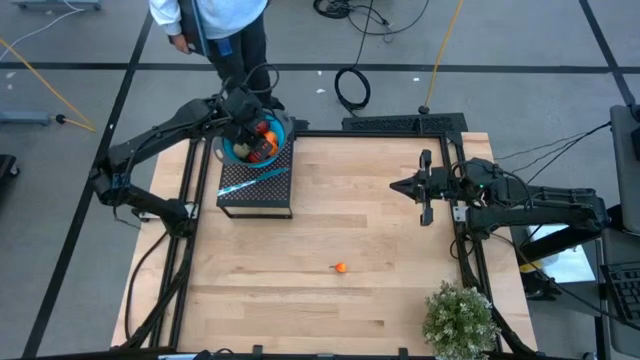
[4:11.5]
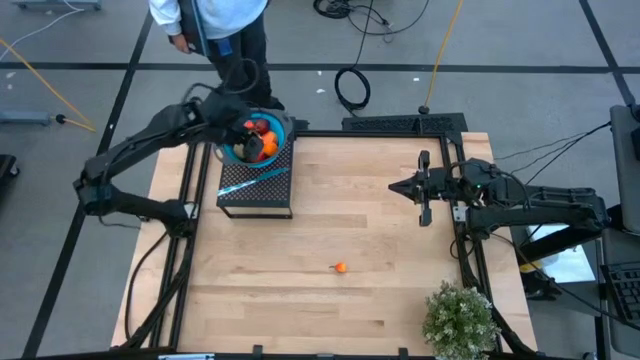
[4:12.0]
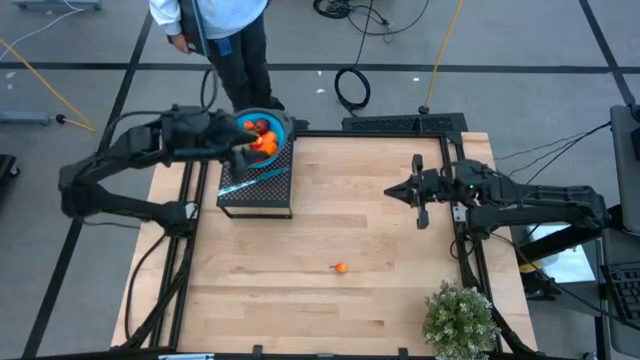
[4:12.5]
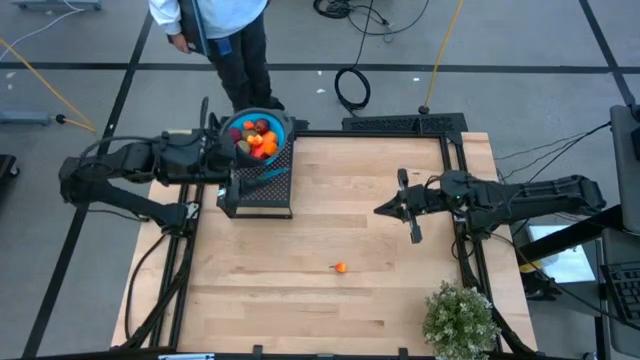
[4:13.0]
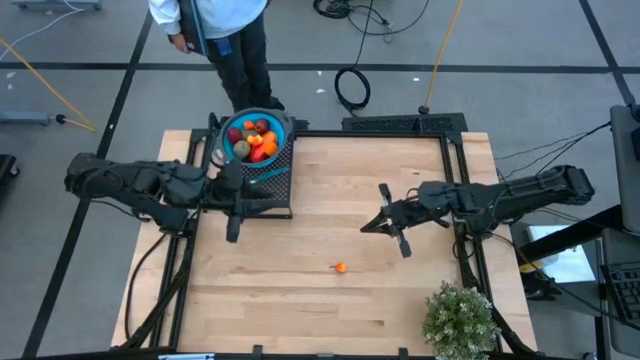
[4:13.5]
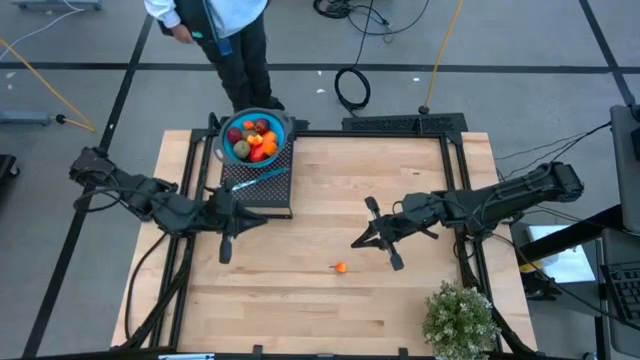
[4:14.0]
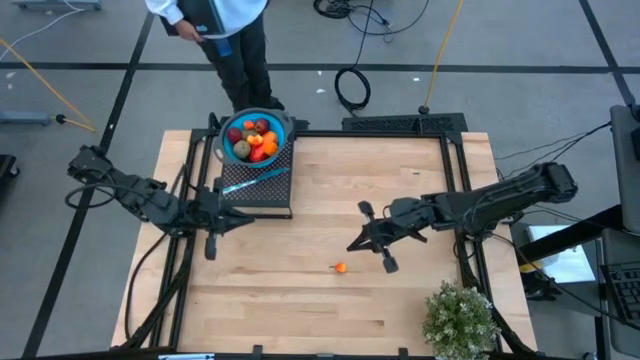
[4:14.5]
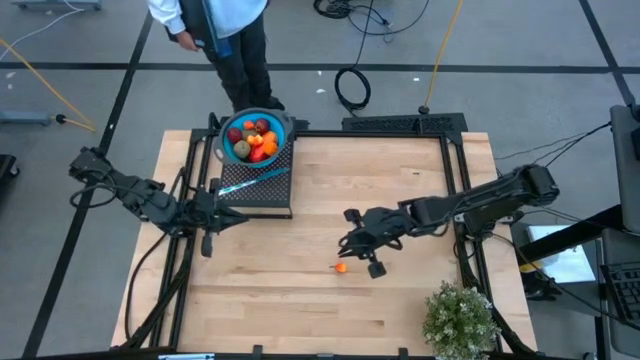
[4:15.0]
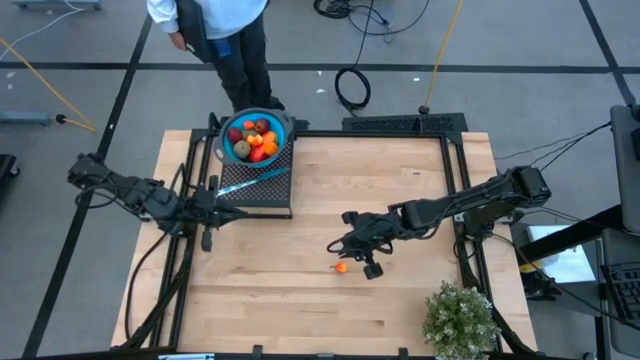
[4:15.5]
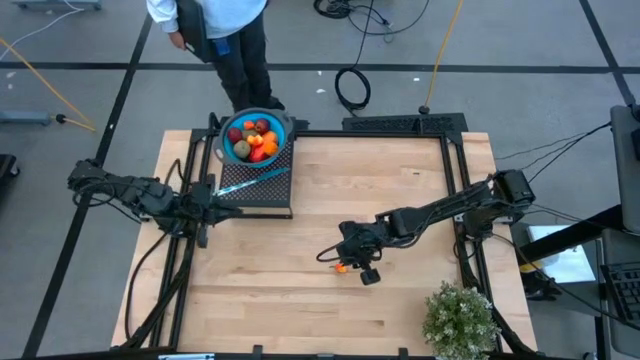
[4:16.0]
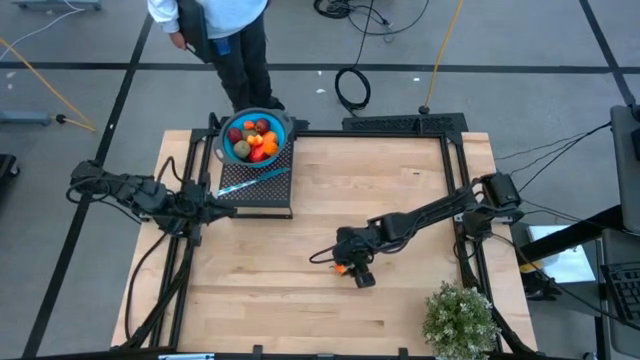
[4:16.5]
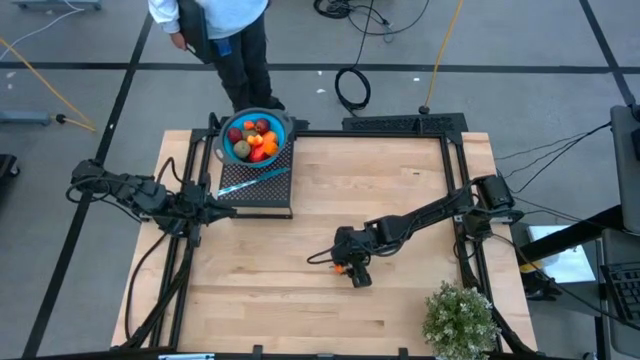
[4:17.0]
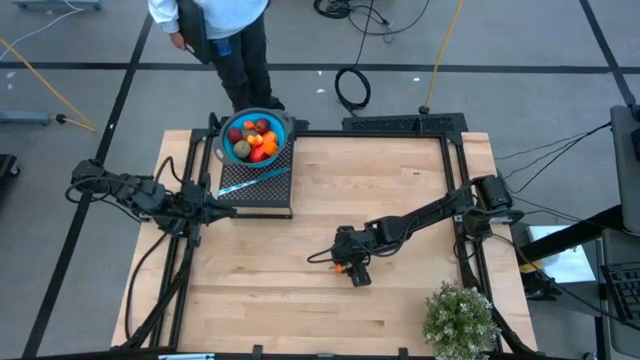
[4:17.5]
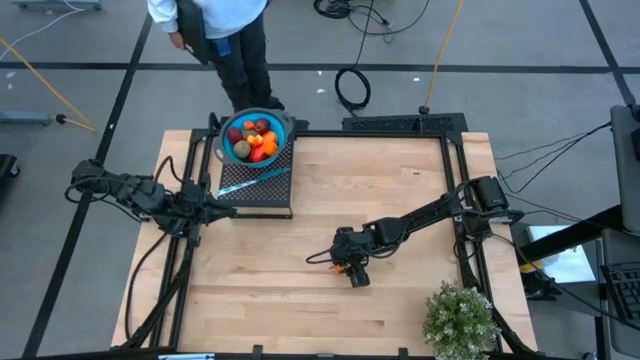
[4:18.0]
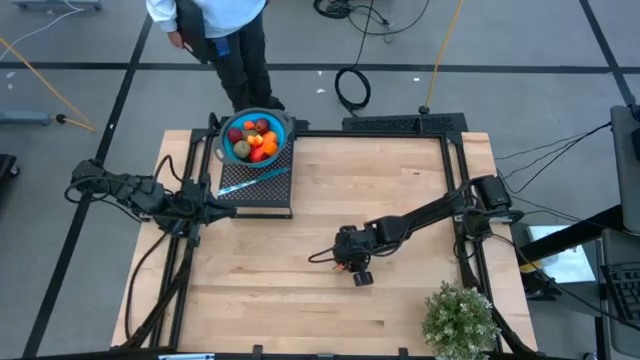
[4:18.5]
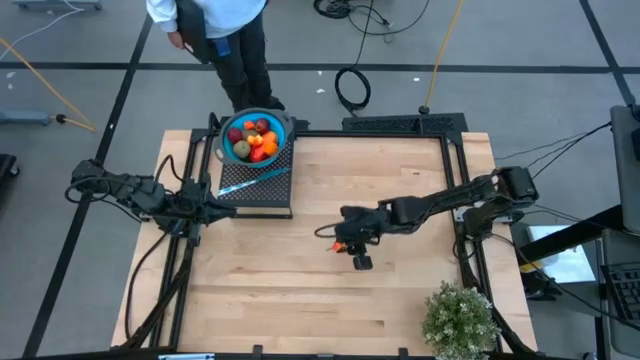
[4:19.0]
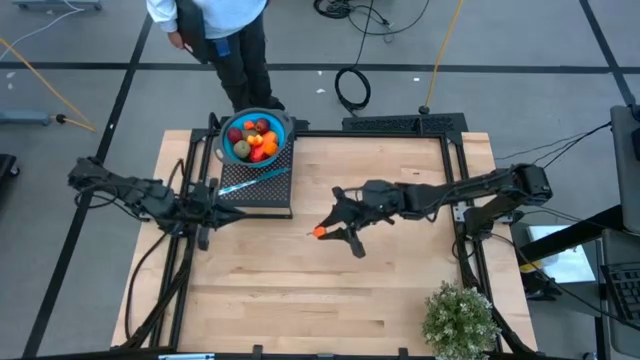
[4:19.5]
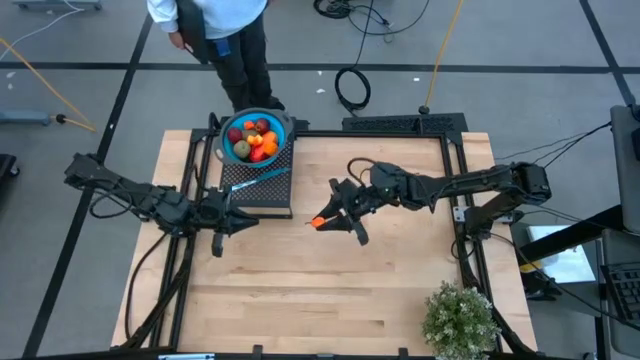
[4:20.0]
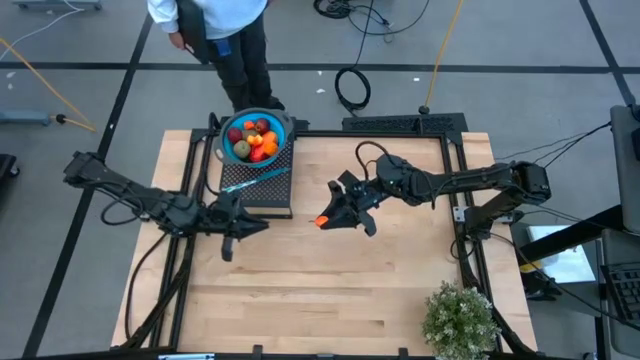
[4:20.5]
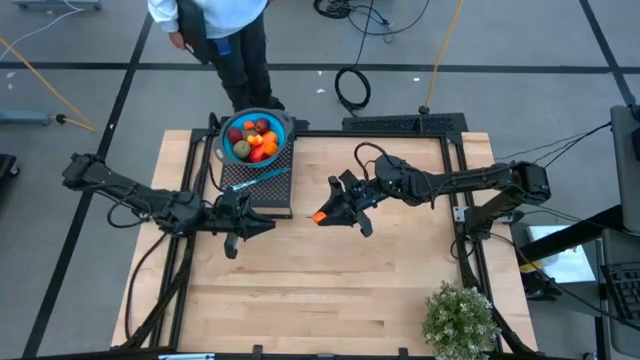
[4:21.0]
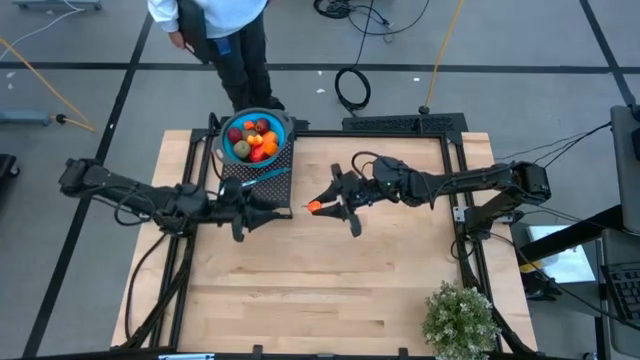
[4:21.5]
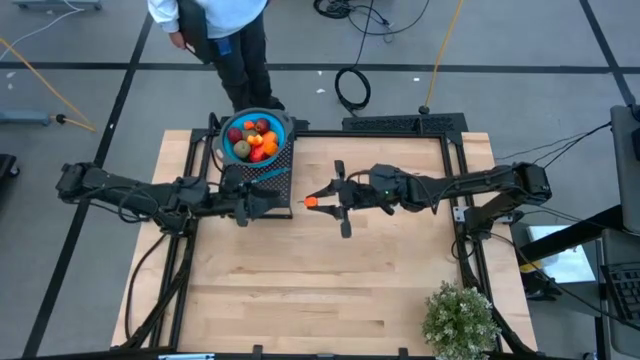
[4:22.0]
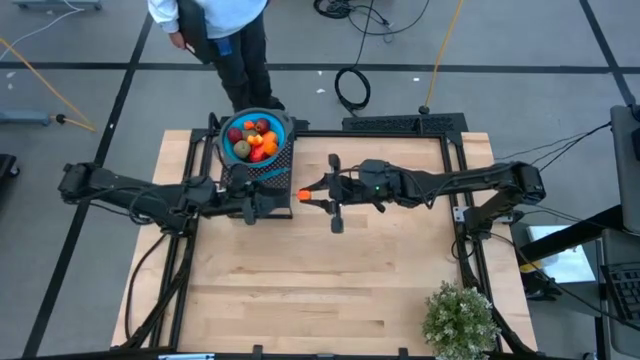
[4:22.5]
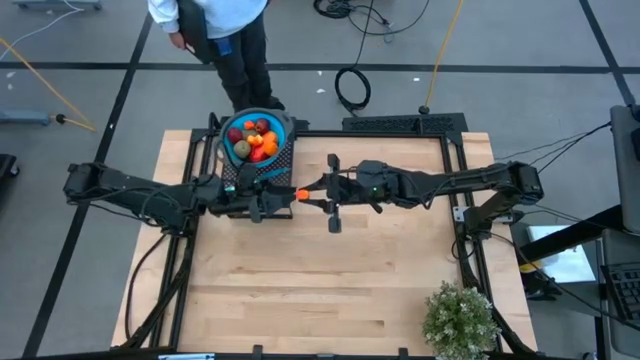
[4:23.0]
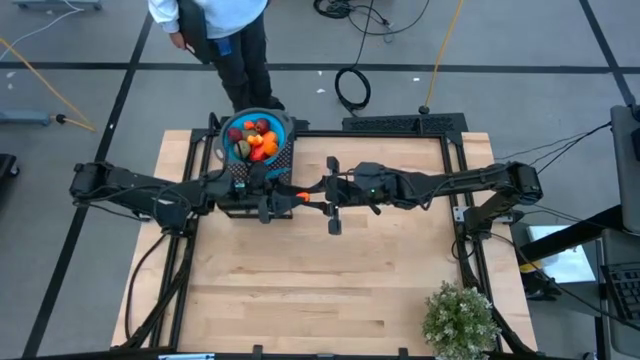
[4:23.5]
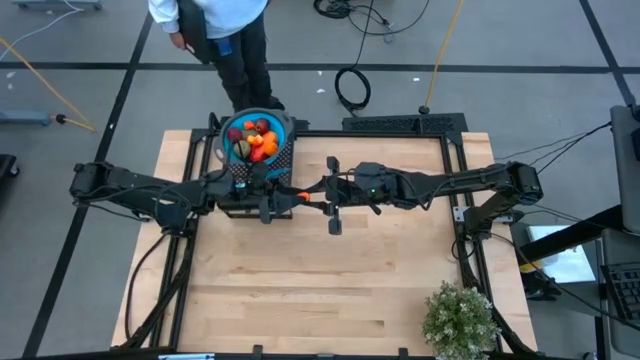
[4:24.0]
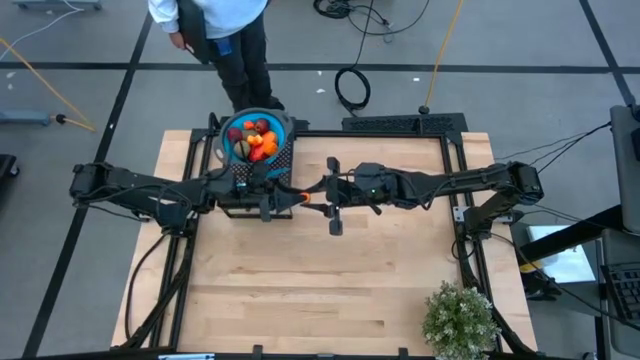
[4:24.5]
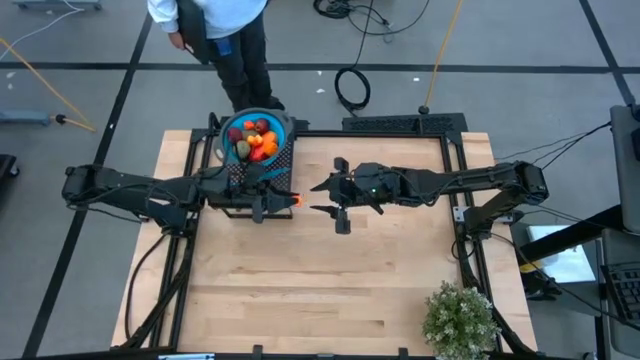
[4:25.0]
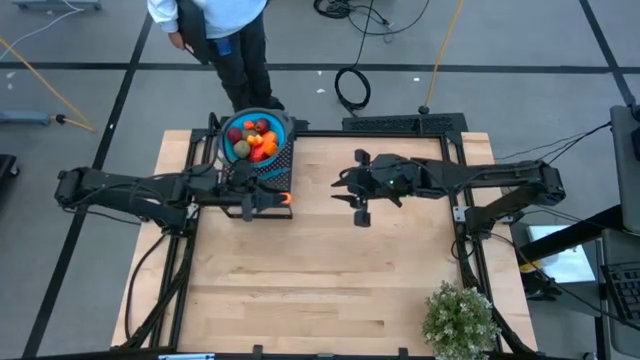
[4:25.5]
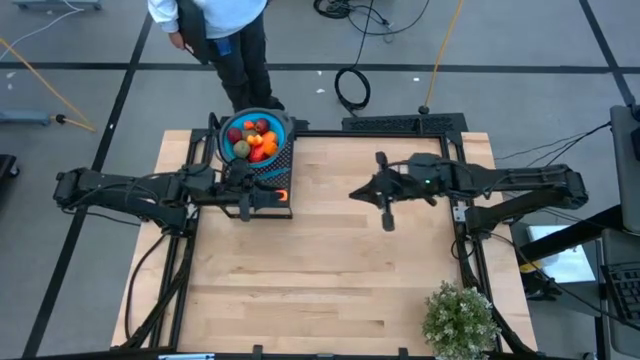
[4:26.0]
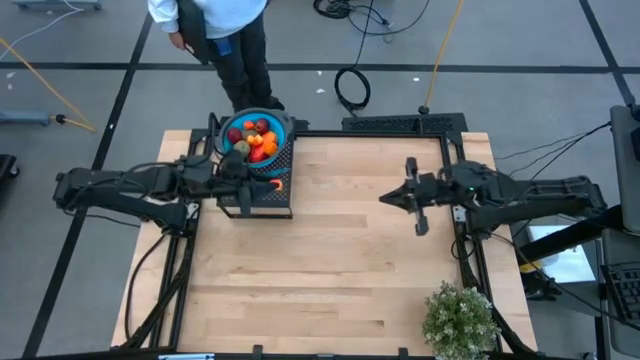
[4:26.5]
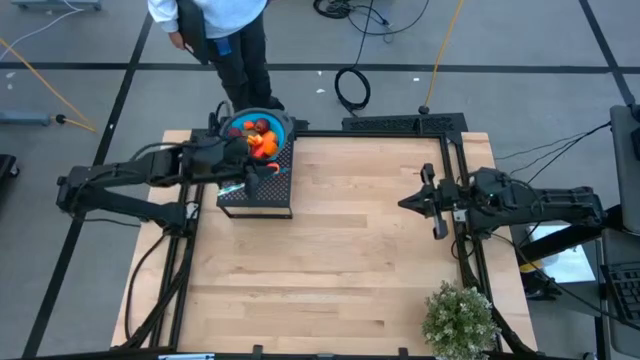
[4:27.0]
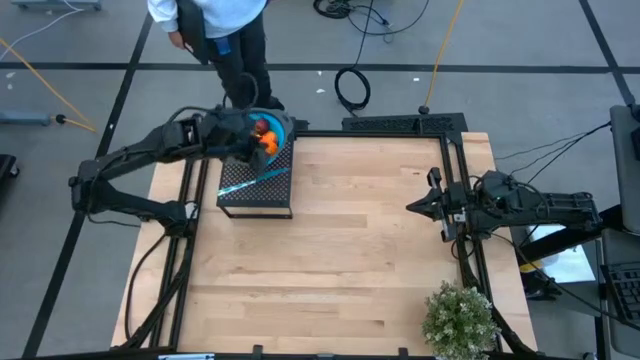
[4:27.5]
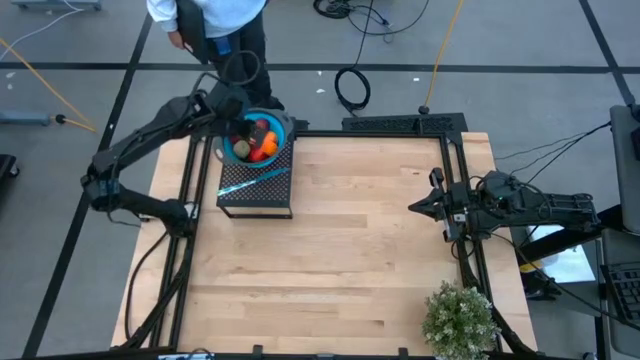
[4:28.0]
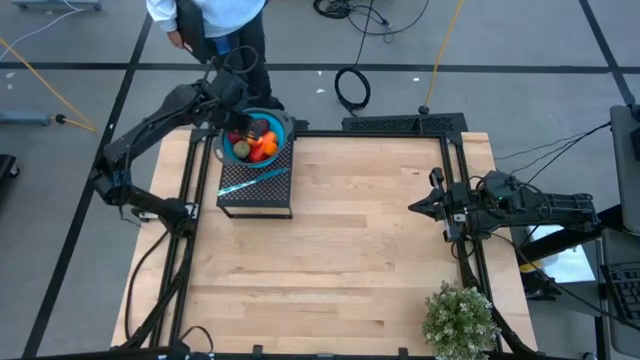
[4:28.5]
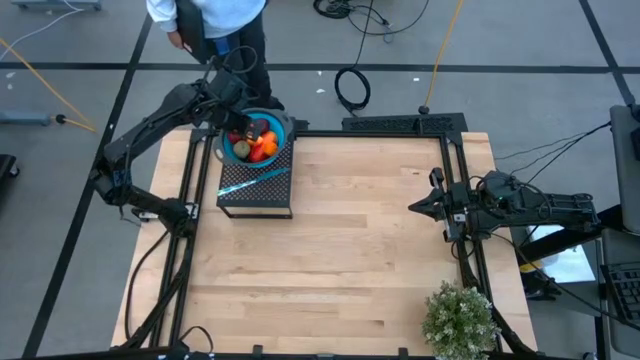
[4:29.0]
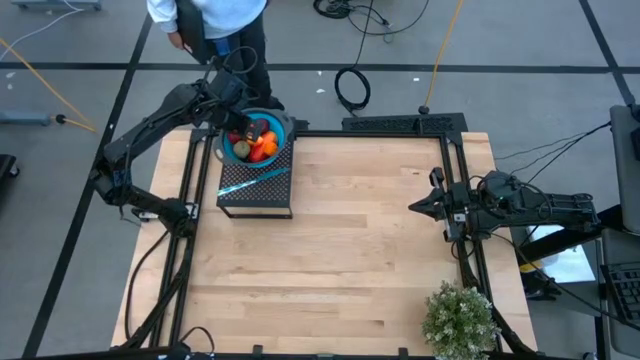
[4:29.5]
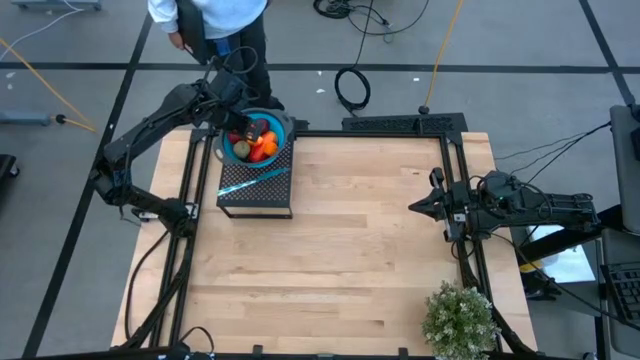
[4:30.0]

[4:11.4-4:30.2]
Task: Pick & Place Fruit
Put the yellow pear into the blue strainer bowl on the shelf

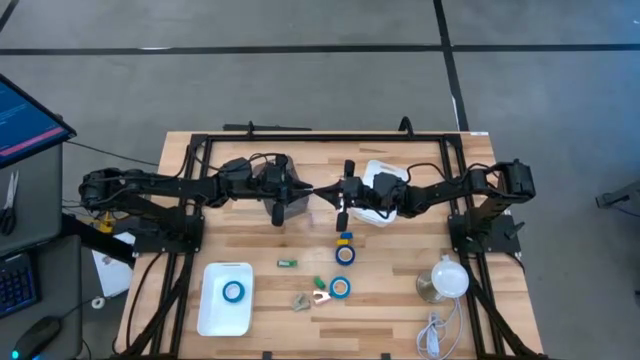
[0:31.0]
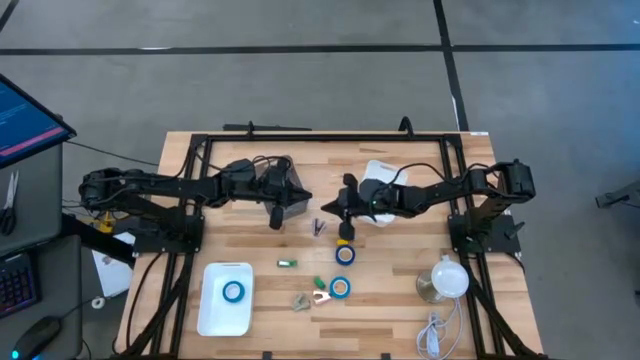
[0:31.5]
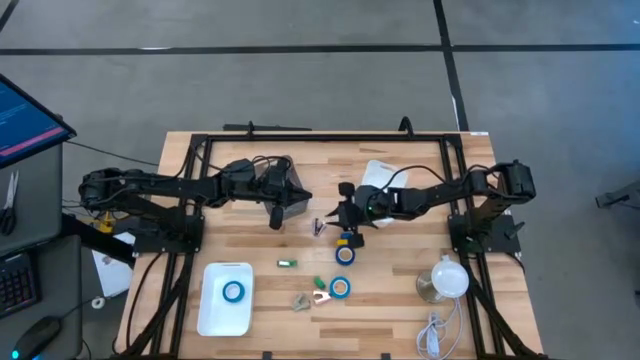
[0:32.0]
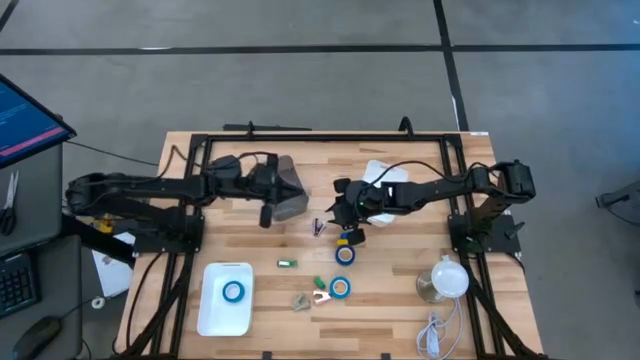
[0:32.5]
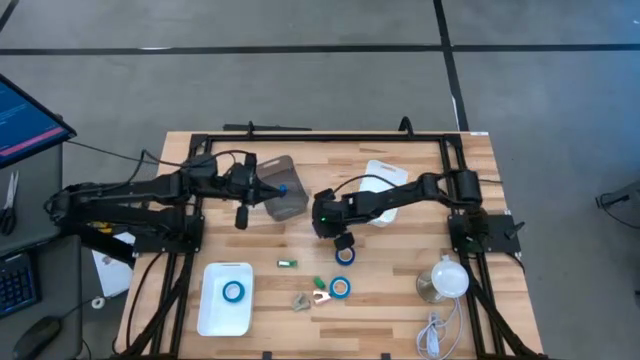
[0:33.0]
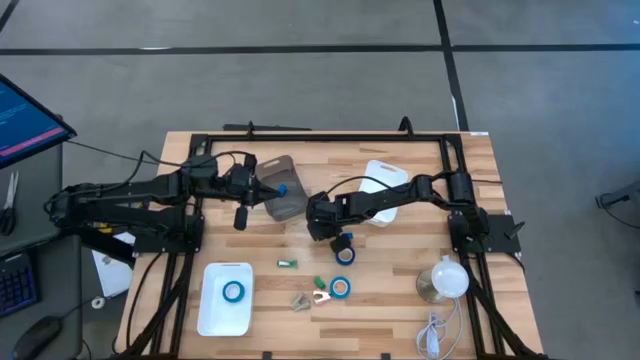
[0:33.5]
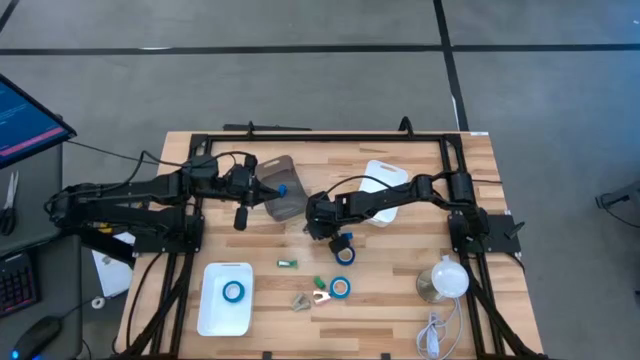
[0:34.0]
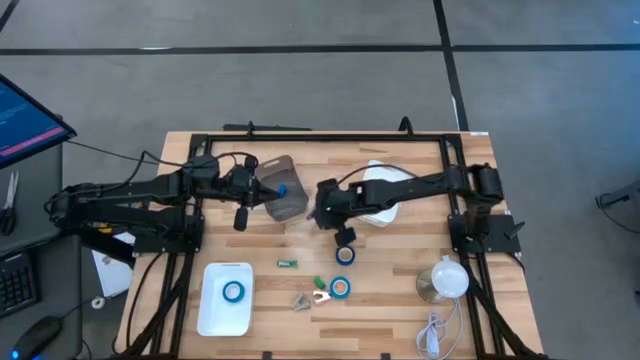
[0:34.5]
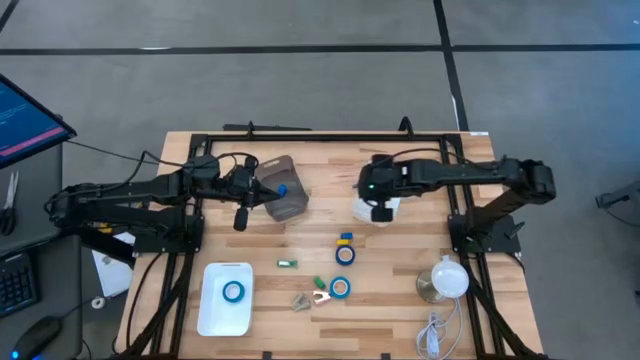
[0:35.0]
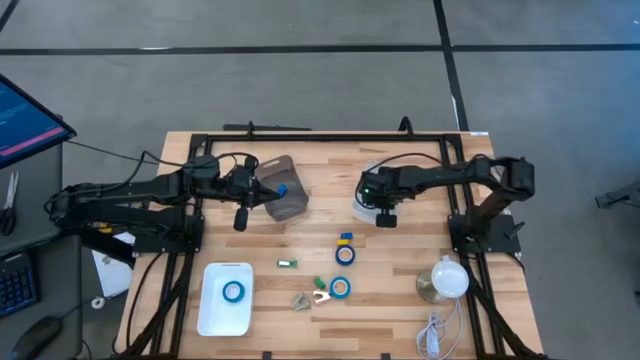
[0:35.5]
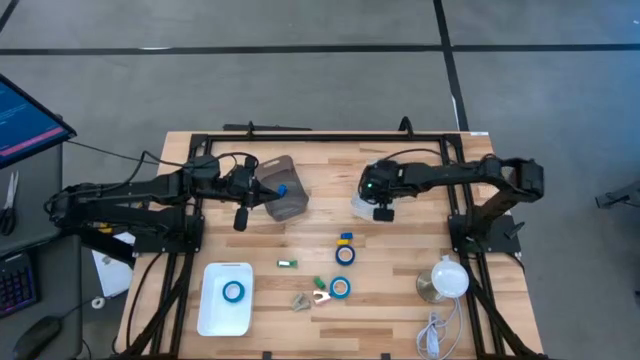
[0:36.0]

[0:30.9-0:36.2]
Task: Pick and place Stapler, Stapler remover, tape
Put the purple stapler remover into the top white bin
